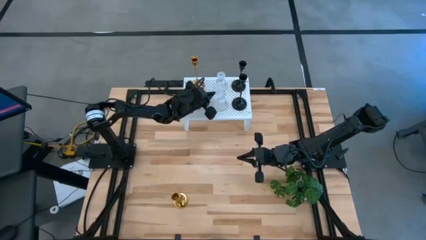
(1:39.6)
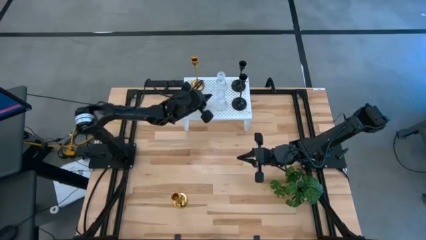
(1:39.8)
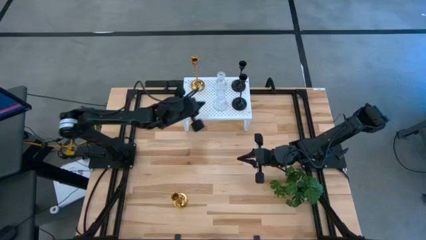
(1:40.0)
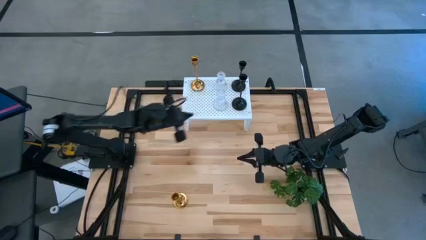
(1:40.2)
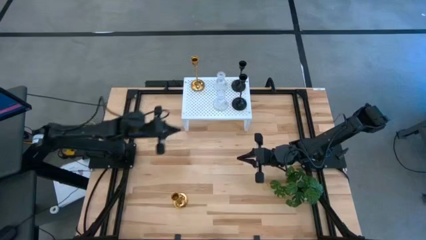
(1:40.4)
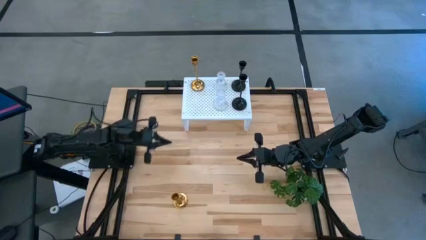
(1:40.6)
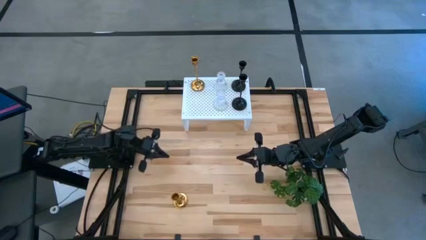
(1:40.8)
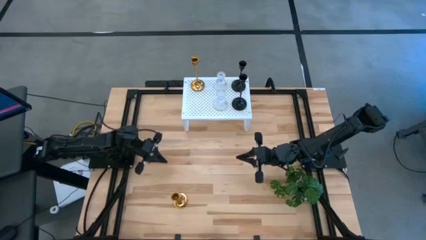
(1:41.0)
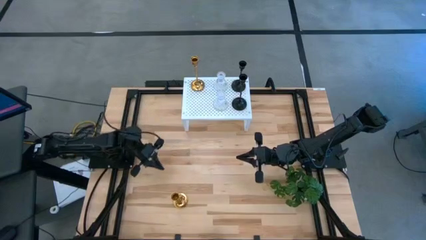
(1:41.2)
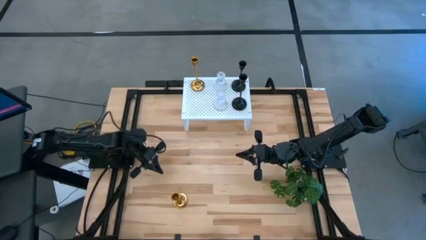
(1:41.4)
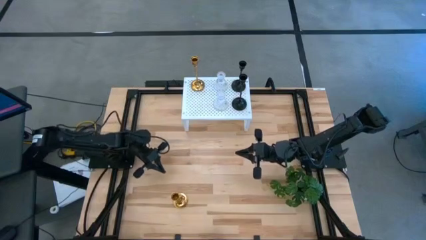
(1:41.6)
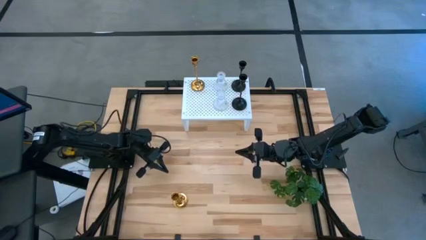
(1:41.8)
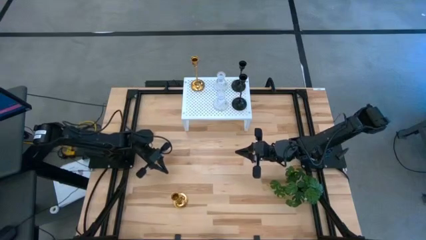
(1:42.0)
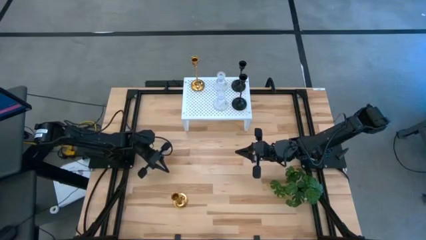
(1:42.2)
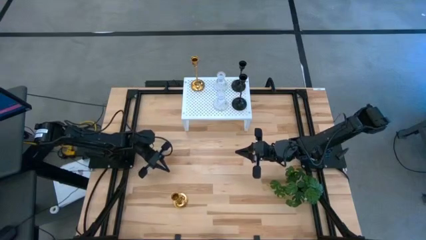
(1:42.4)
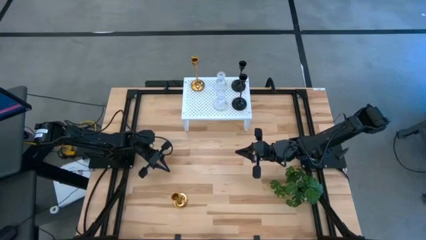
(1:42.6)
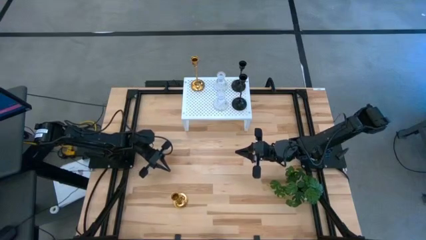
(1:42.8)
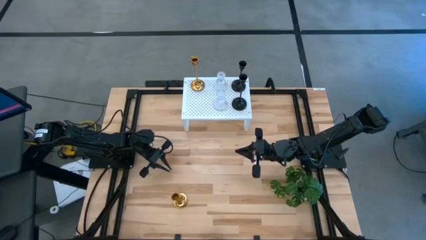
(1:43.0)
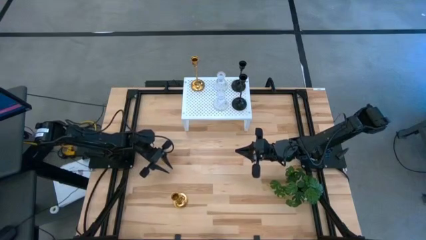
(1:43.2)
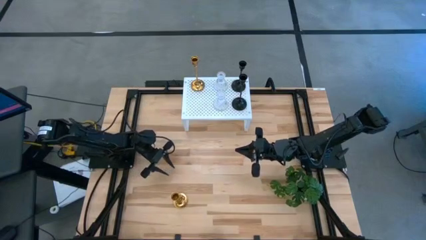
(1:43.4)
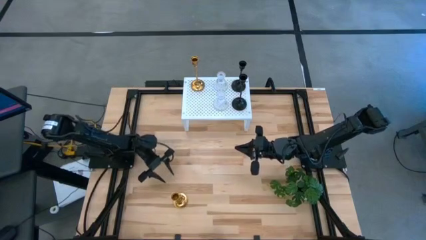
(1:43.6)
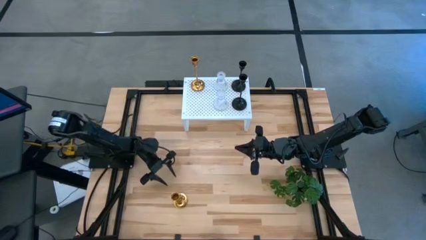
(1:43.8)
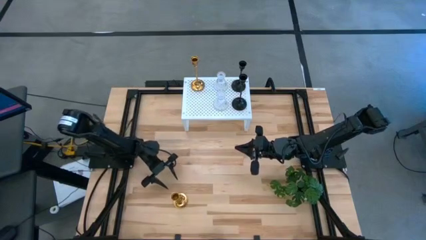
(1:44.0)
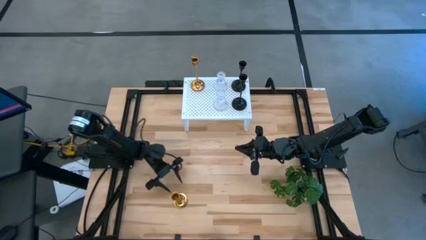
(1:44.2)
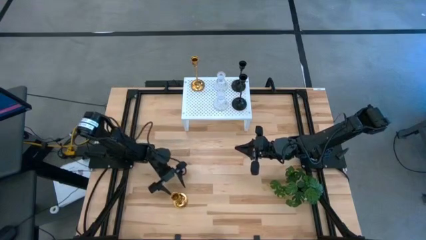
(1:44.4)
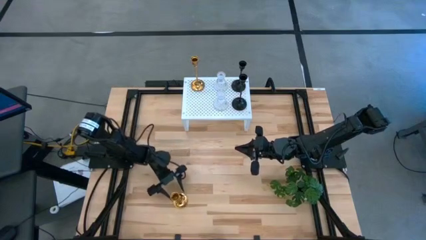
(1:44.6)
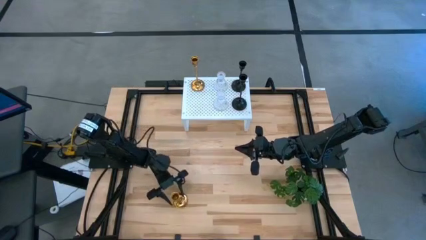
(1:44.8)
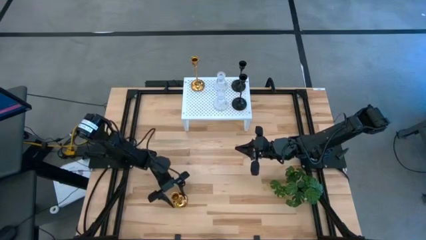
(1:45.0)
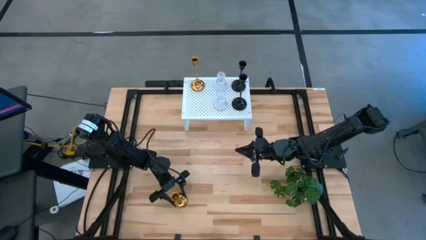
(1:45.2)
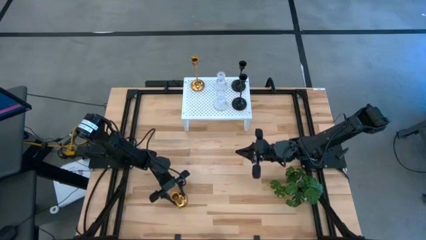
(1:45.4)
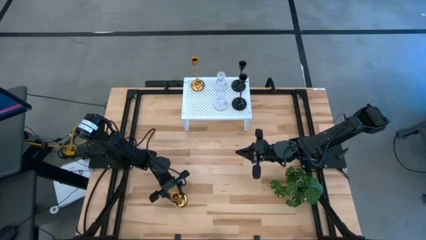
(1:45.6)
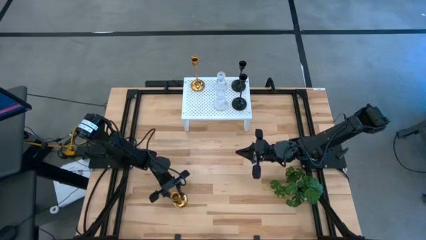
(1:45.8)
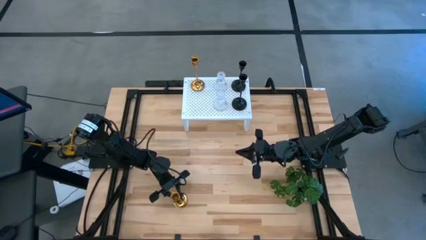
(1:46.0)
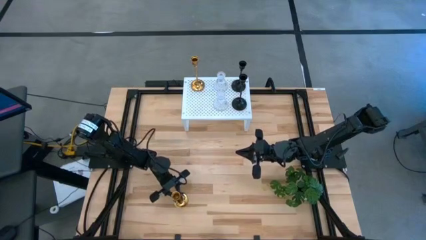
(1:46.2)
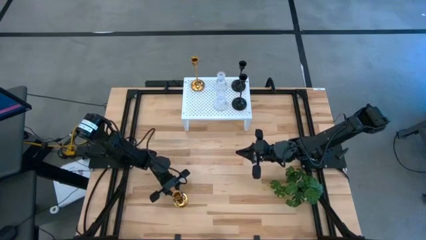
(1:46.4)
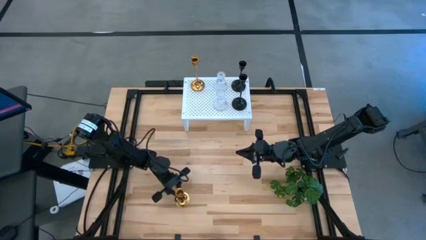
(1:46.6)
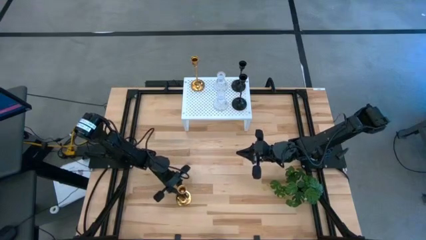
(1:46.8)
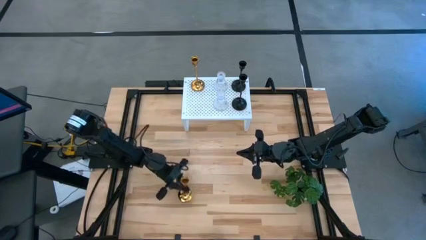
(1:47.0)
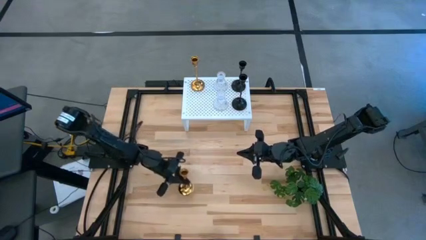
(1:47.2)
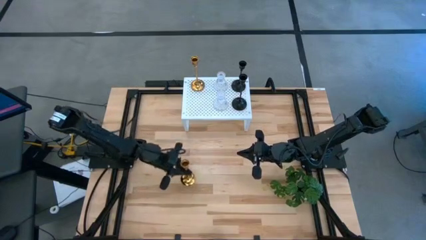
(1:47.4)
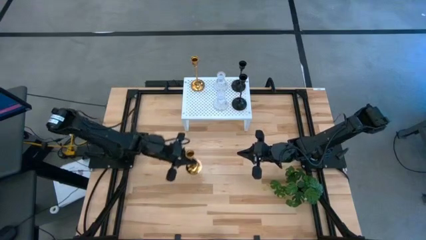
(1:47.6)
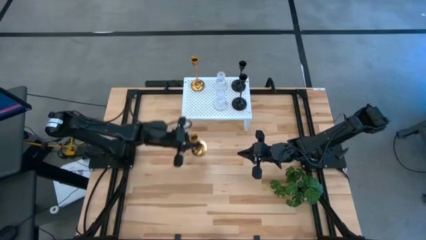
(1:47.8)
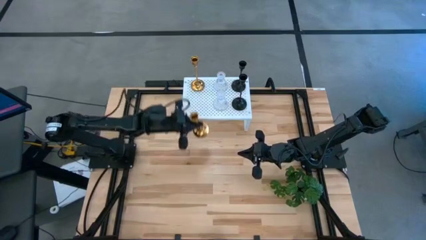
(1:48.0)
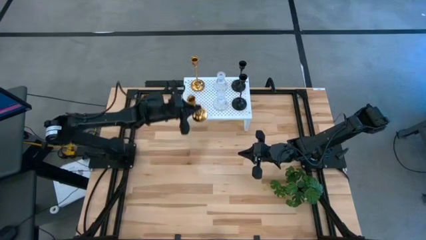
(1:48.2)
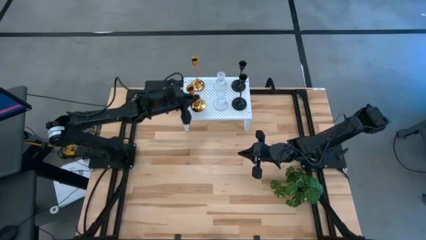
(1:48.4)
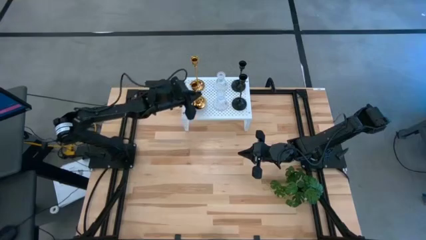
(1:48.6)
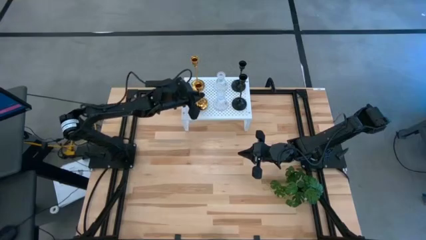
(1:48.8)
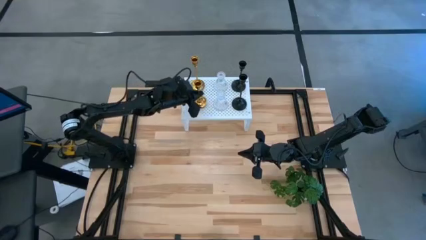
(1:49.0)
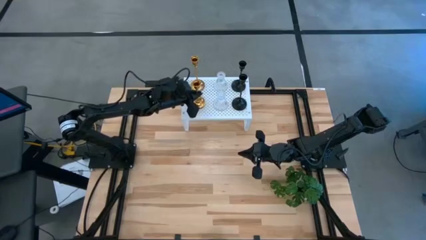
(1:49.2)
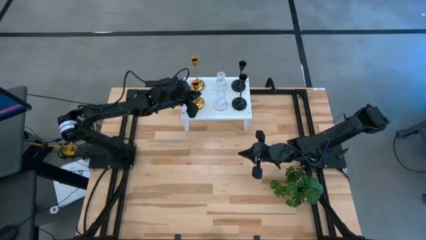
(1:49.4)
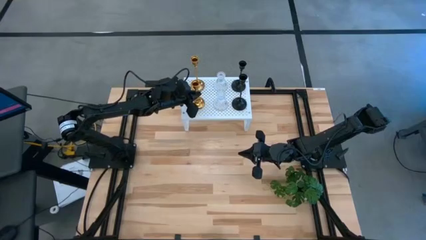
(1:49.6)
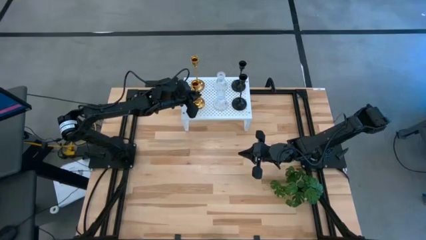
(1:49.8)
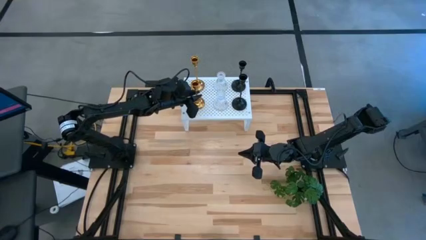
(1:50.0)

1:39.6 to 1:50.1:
Task: Pick & Place candle stick holders
Put the gold candle holder on the shelf aligned with the other gold candle holder
